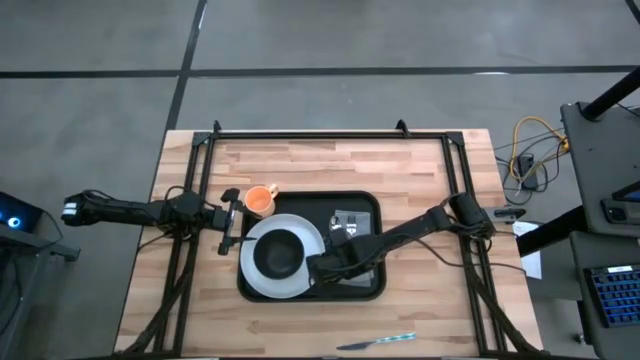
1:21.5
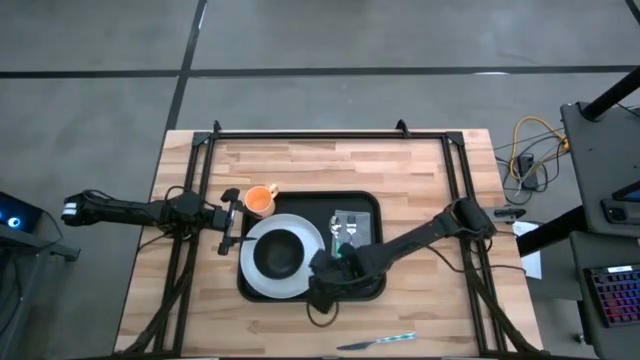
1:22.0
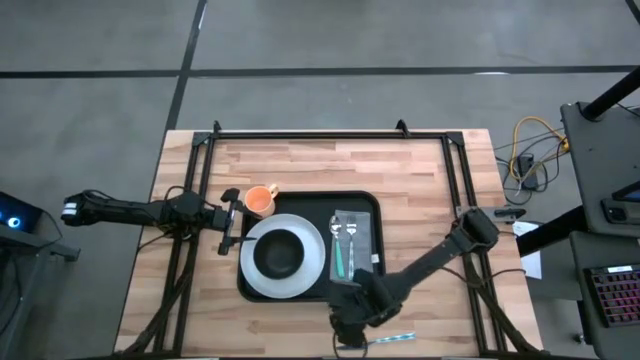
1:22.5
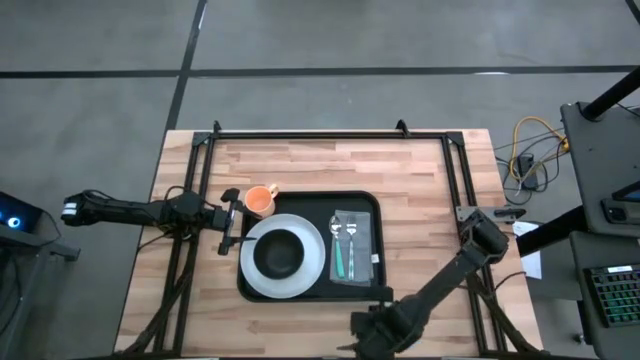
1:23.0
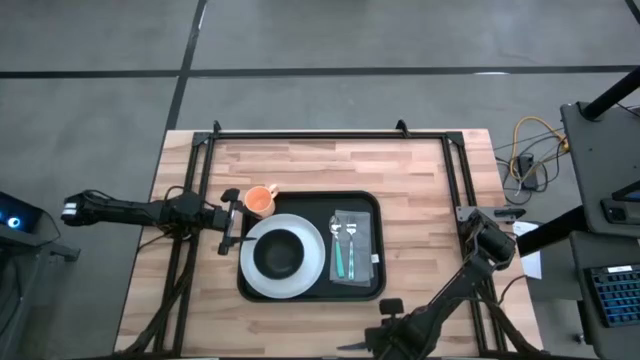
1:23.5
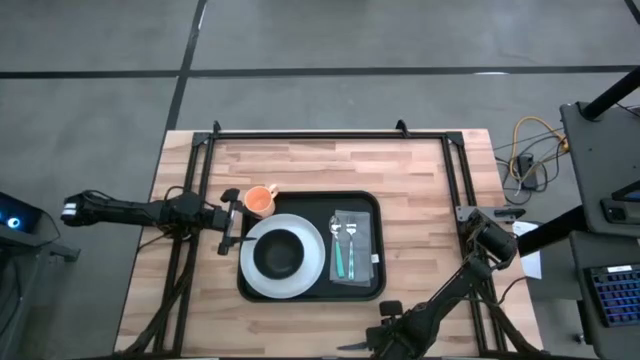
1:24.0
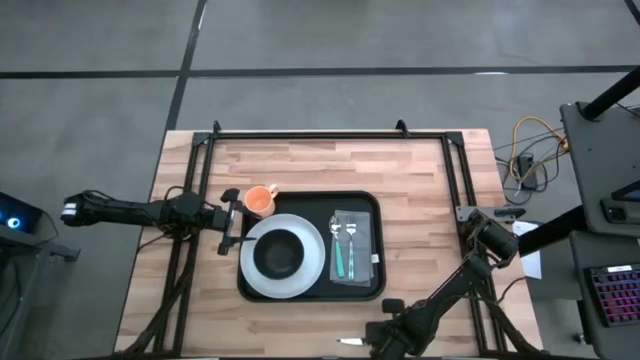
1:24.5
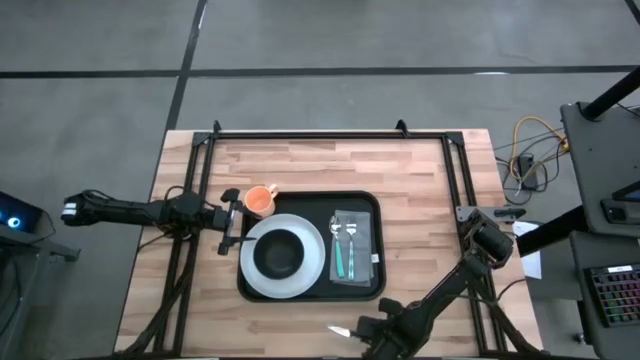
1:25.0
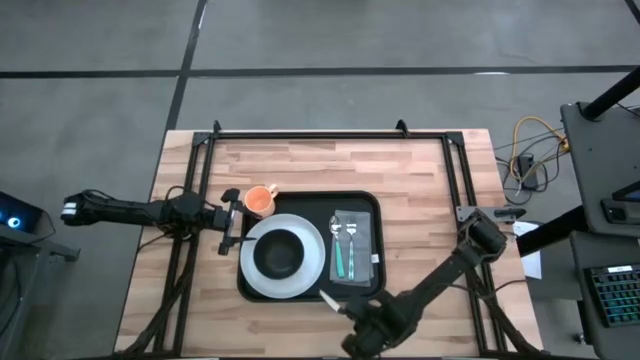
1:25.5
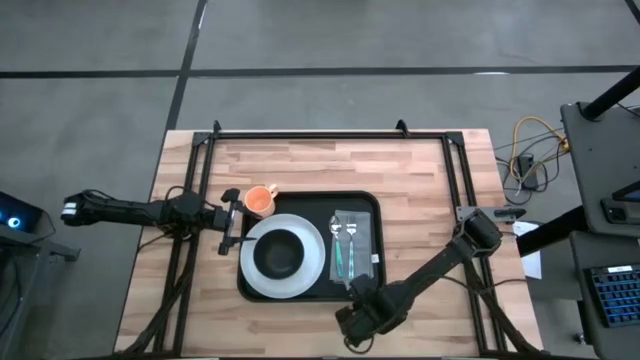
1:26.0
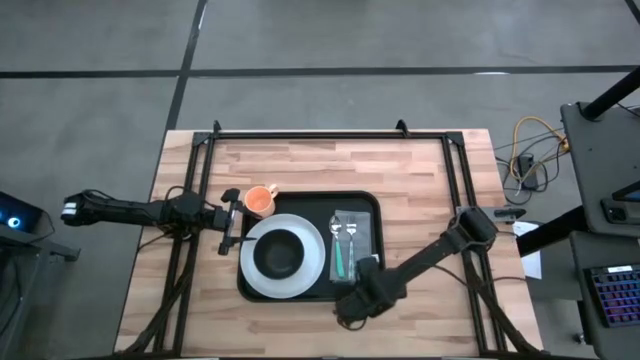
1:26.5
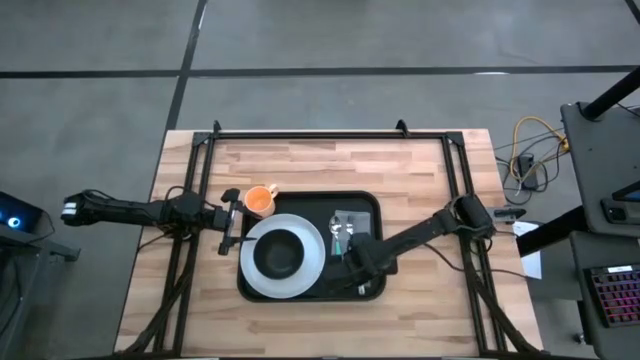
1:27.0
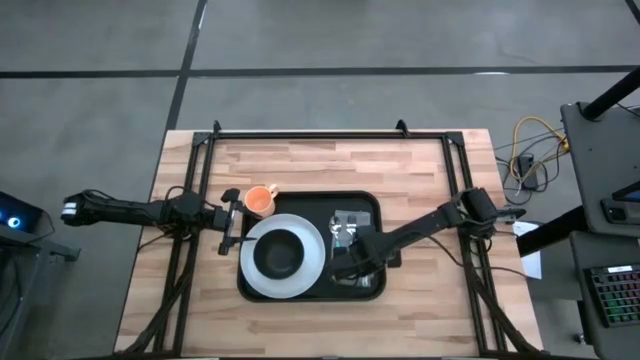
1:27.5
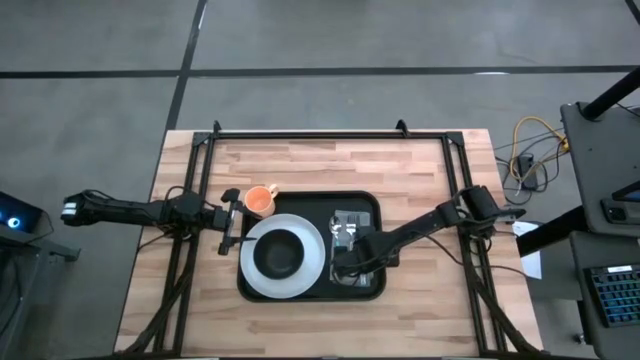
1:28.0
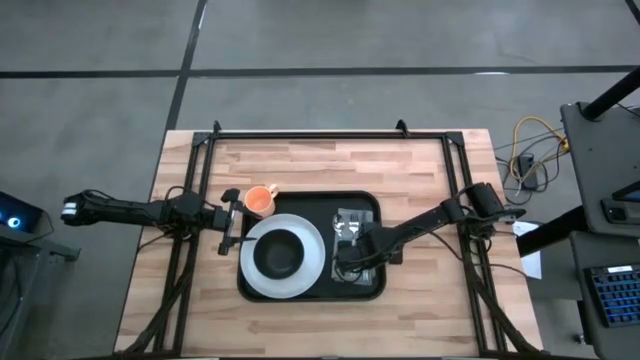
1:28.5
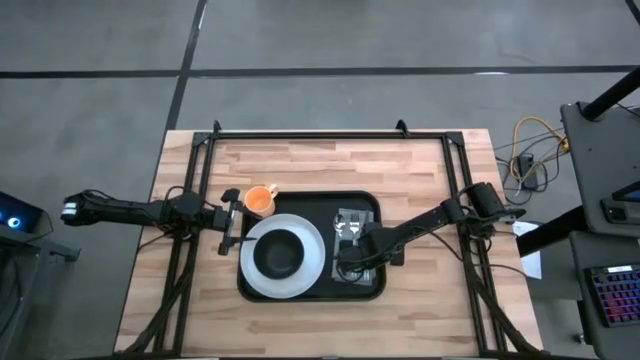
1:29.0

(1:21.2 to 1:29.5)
Task: Set up tray
Put the blue patterned knife on the right side of the blue patterned fork of the gray napkin

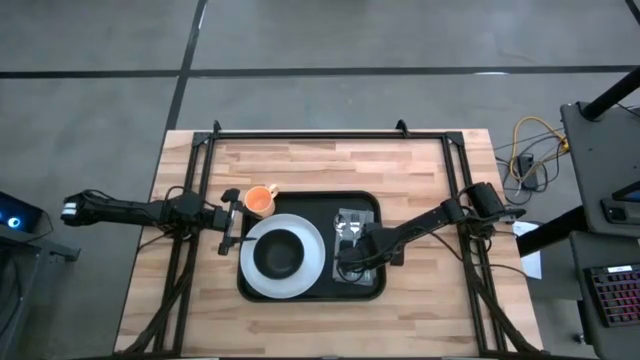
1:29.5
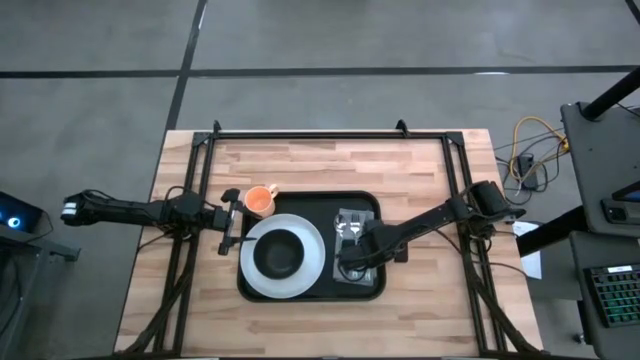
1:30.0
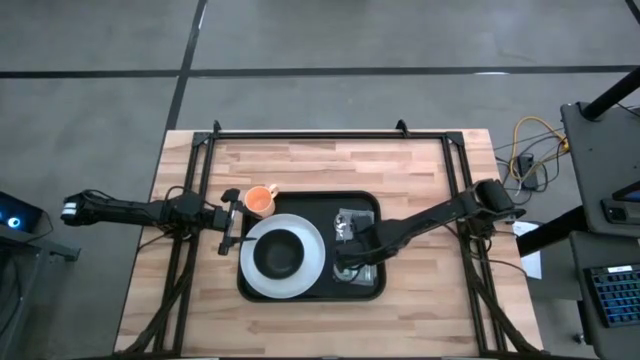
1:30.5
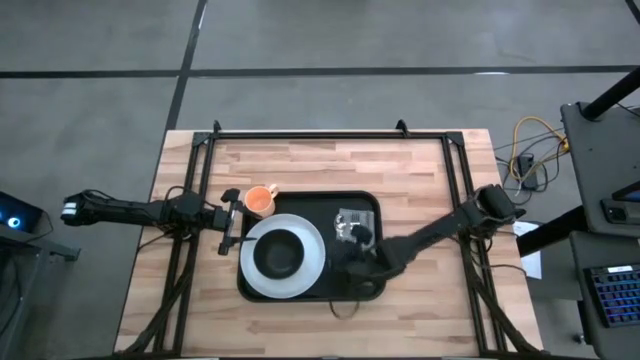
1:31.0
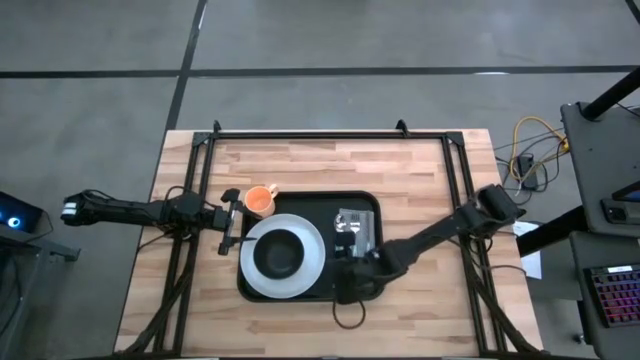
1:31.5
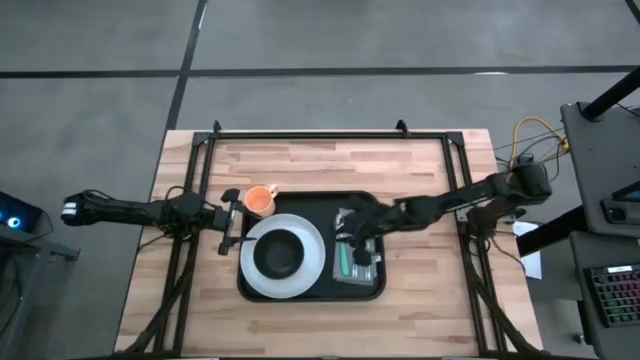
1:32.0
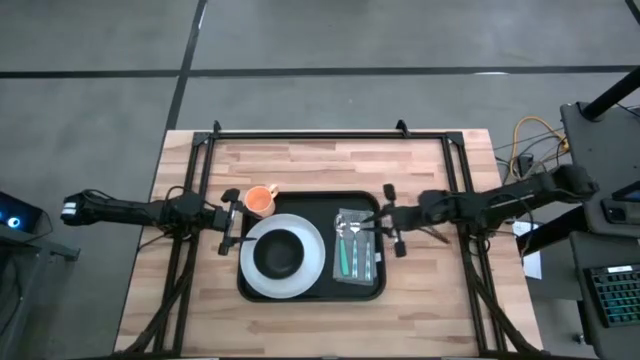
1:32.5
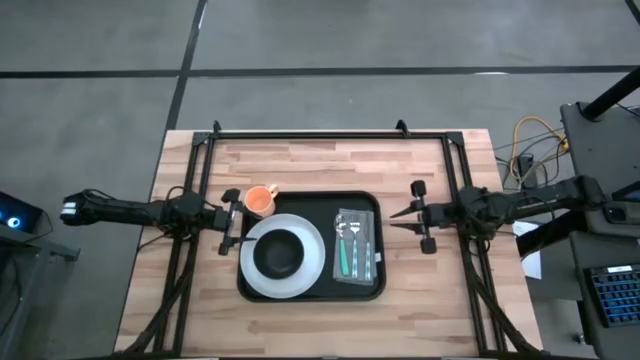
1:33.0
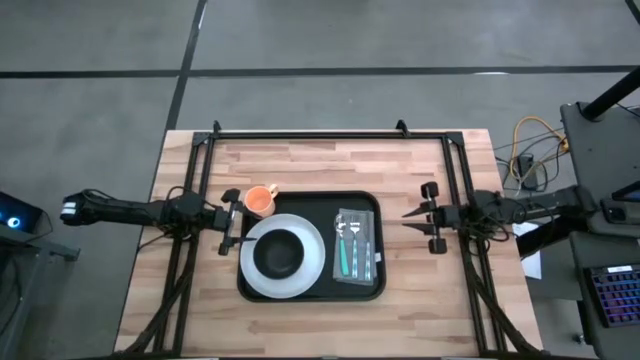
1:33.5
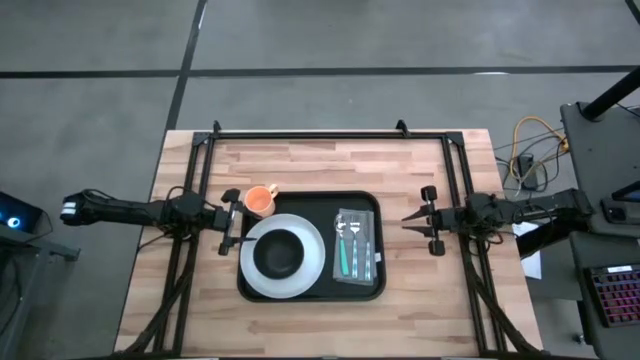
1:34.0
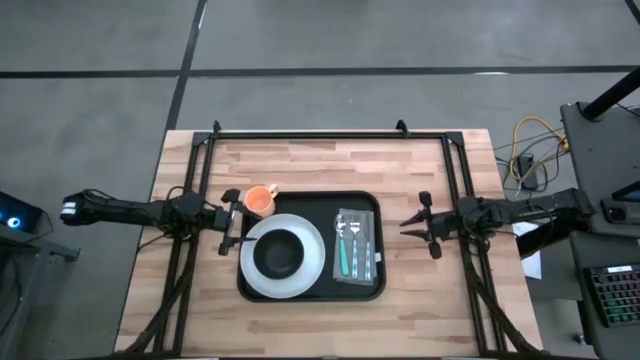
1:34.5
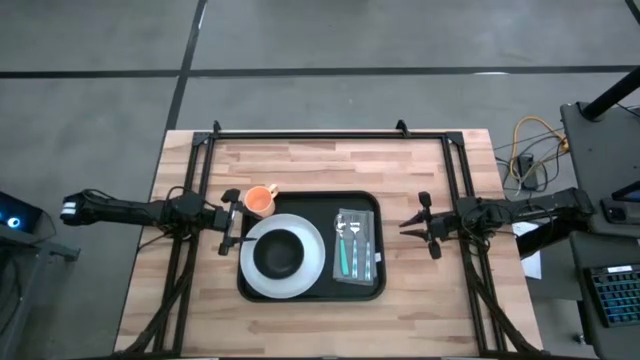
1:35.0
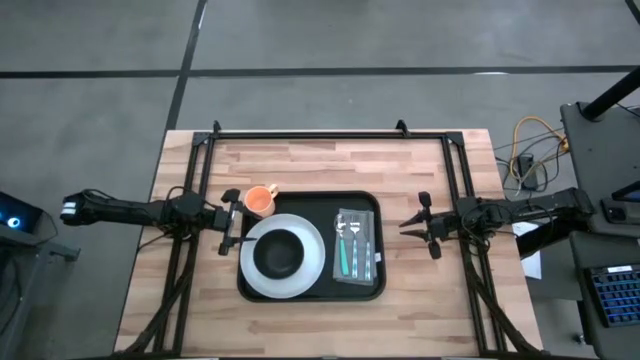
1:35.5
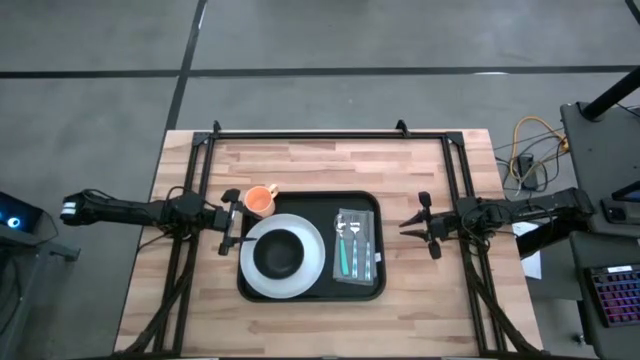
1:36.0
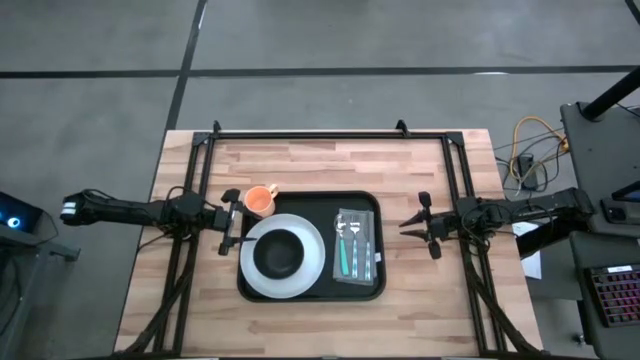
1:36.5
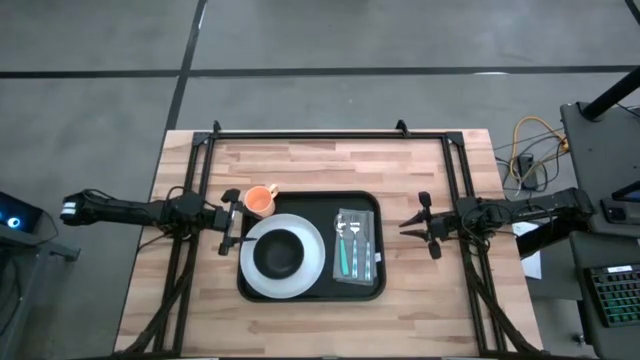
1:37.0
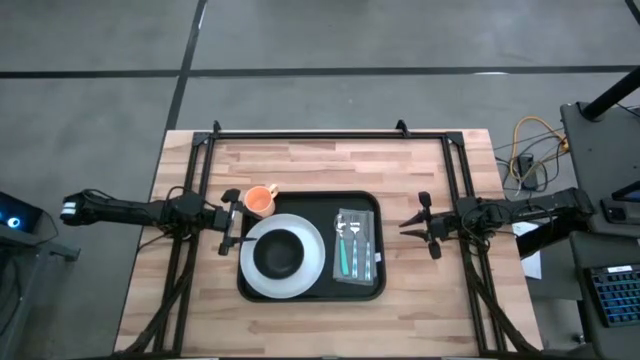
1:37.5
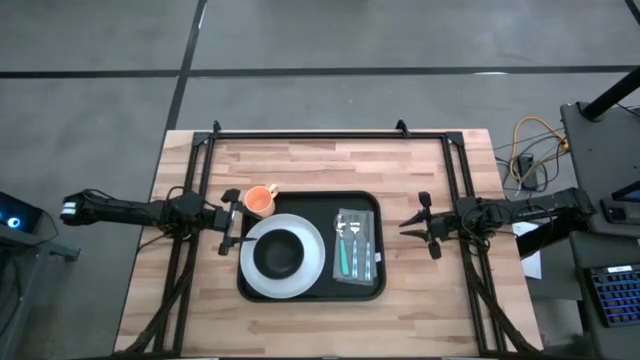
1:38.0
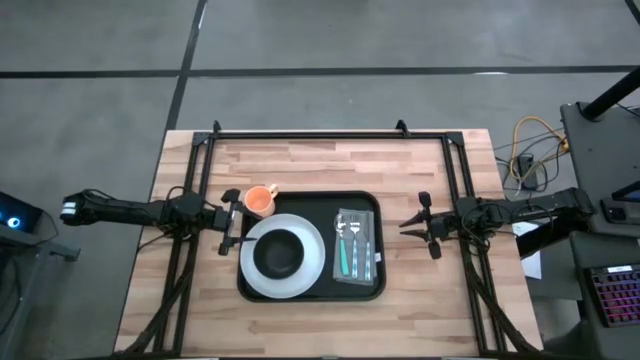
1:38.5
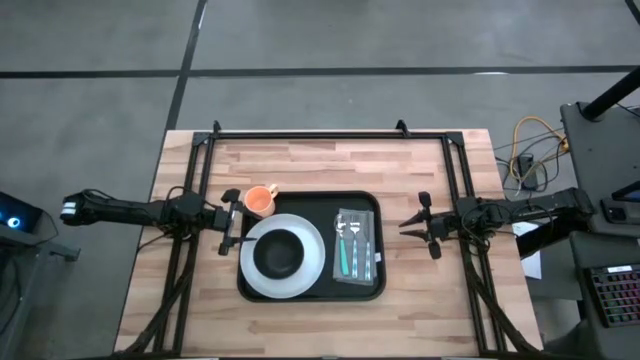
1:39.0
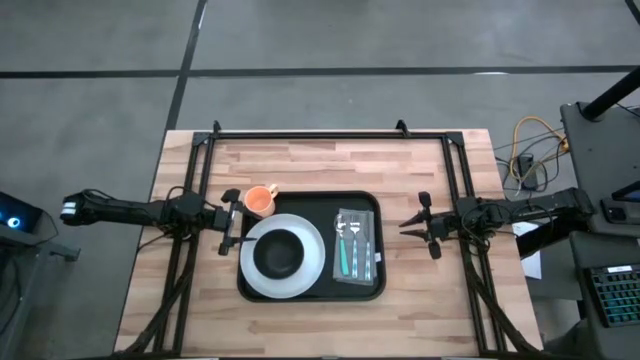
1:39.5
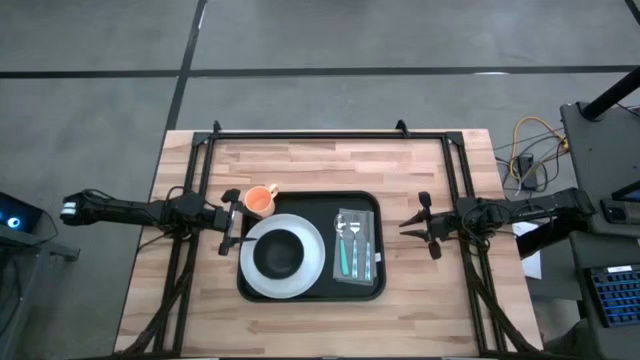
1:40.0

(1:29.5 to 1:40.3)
Return to Home Position

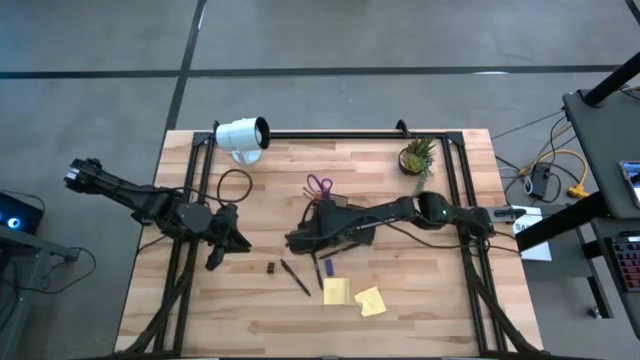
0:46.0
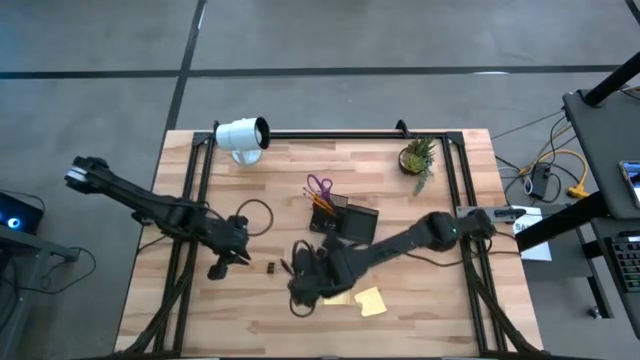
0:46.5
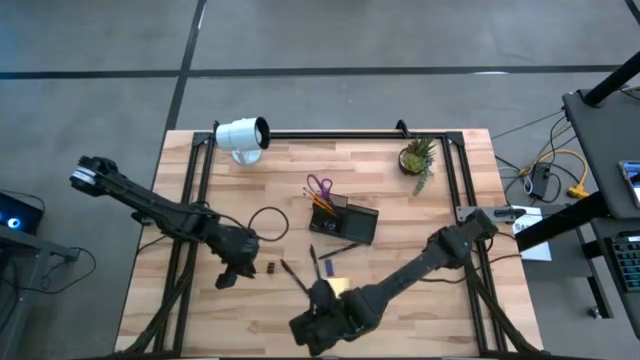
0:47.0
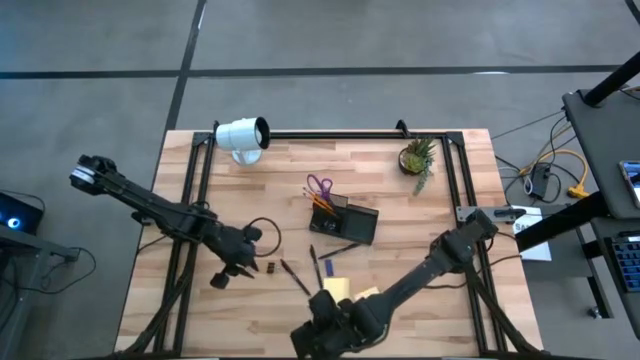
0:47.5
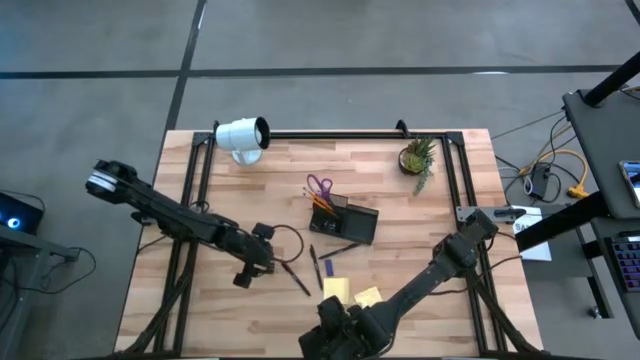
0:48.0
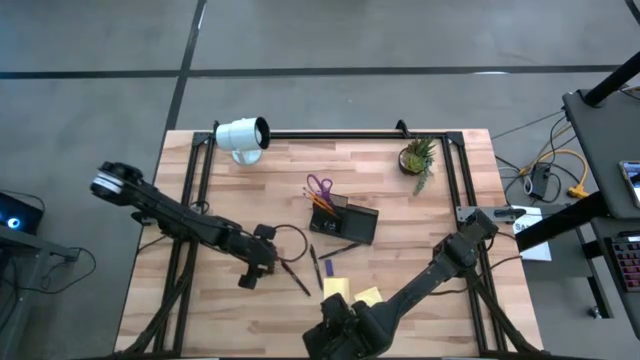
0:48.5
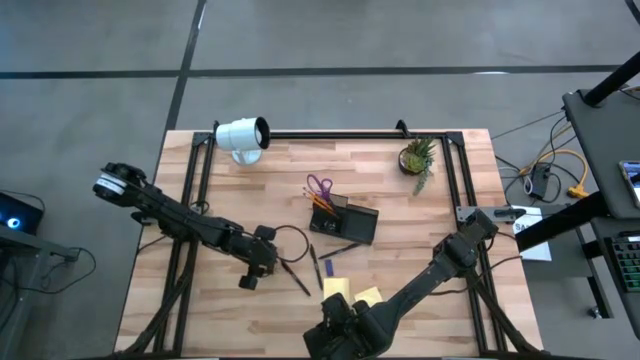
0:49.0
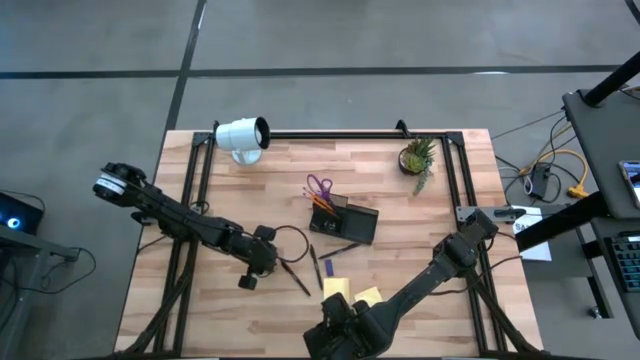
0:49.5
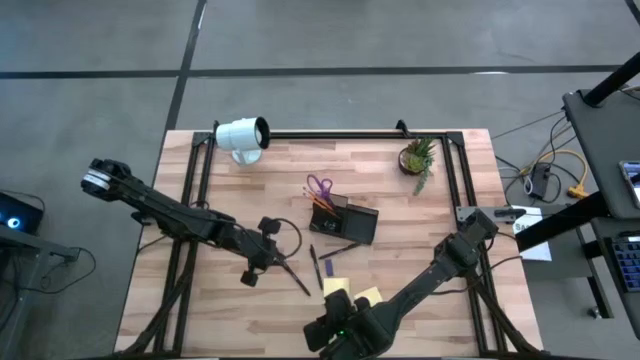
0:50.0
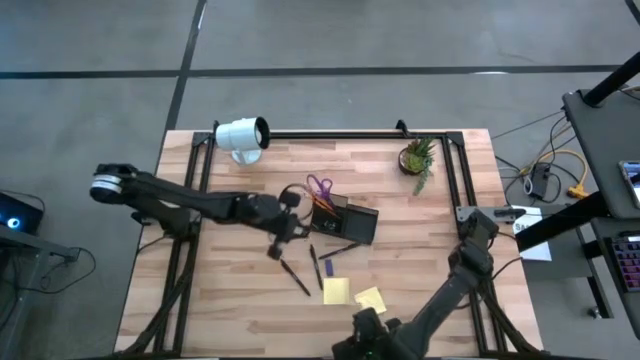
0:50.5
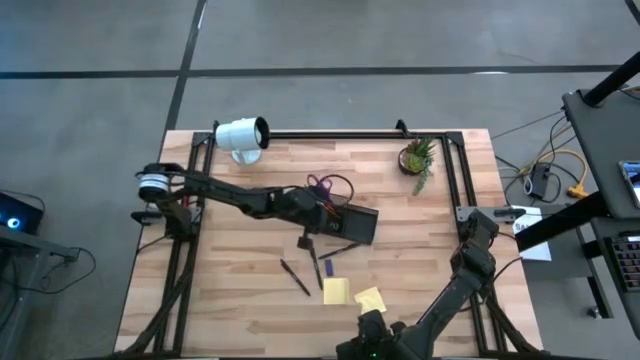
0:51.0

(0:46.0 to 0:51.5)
Task: Pick and place office supplies into organizer
Put the black binder clip into the black desk organizer
